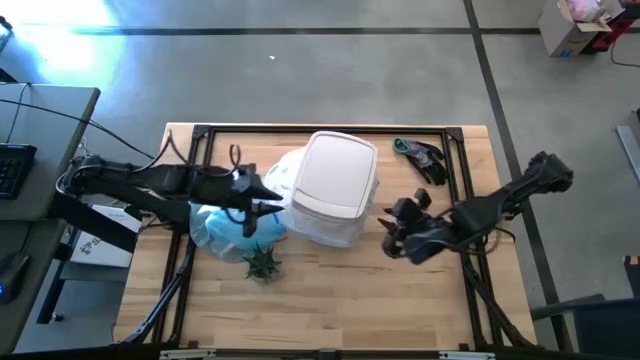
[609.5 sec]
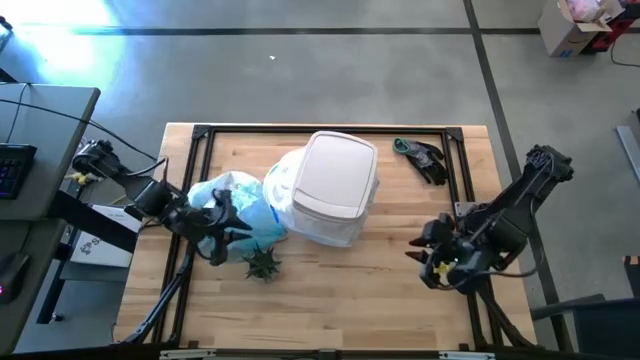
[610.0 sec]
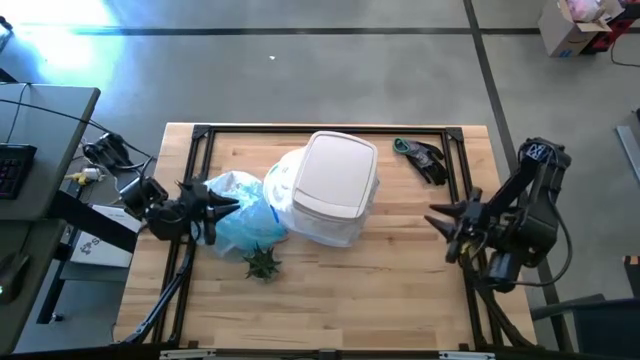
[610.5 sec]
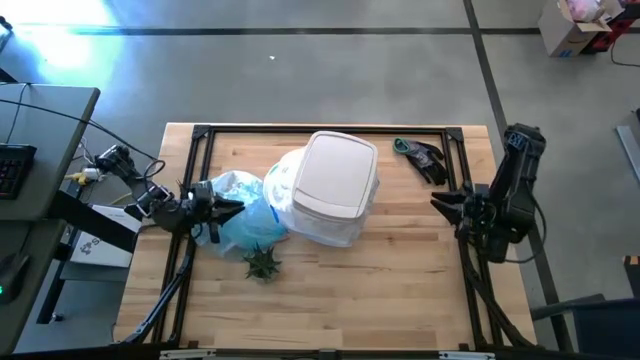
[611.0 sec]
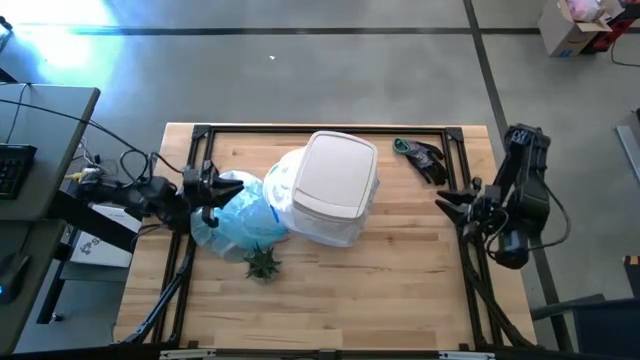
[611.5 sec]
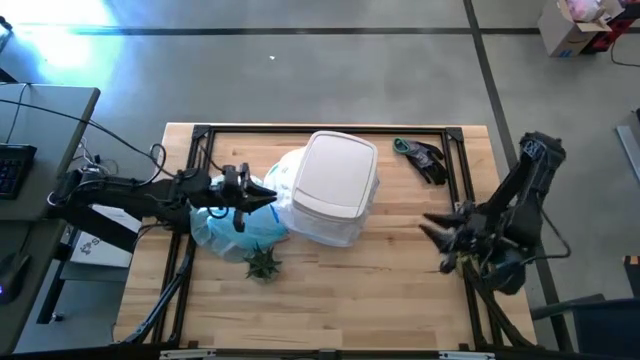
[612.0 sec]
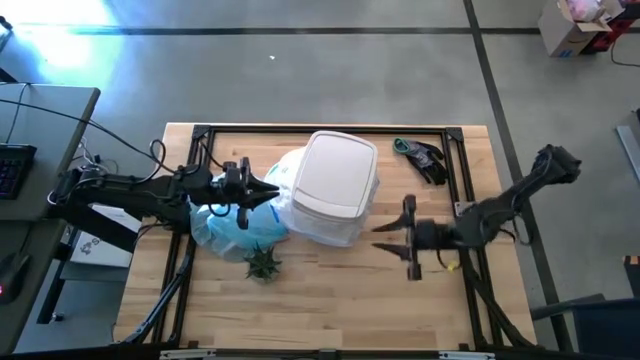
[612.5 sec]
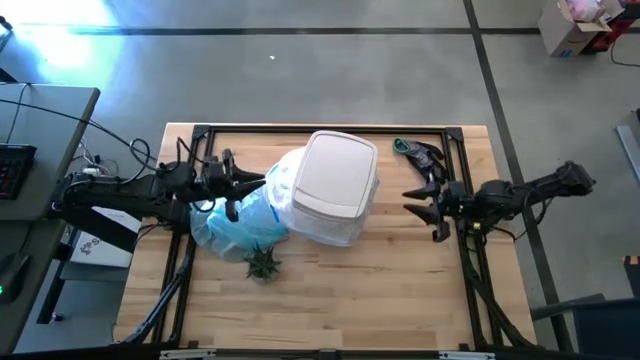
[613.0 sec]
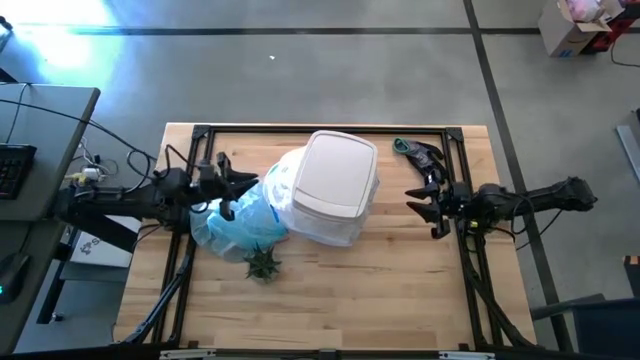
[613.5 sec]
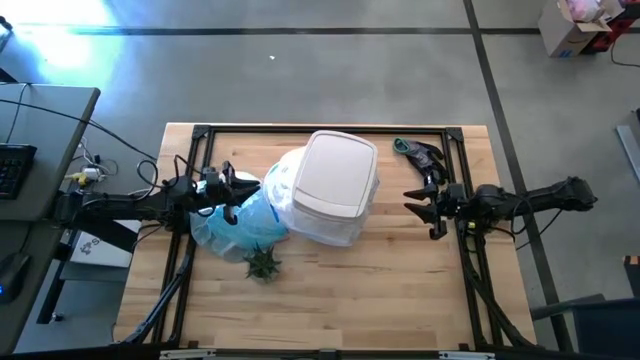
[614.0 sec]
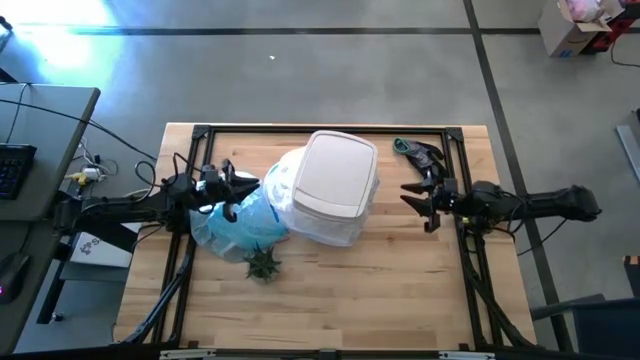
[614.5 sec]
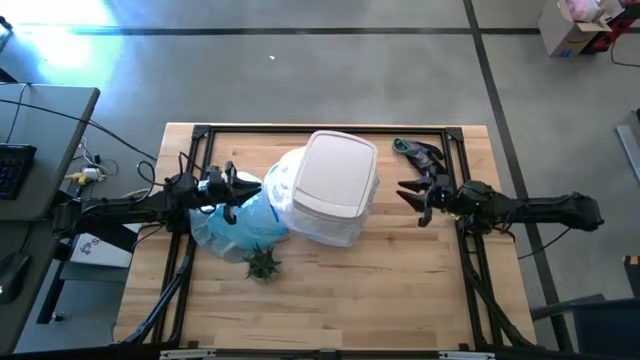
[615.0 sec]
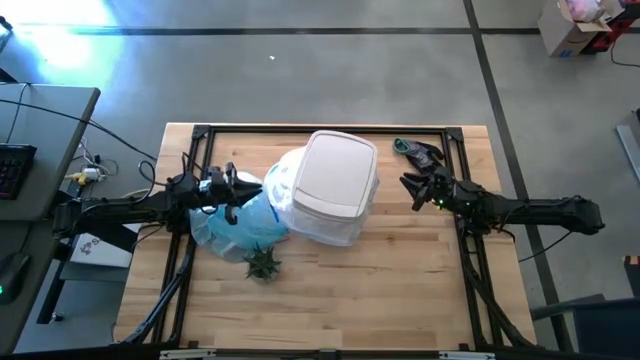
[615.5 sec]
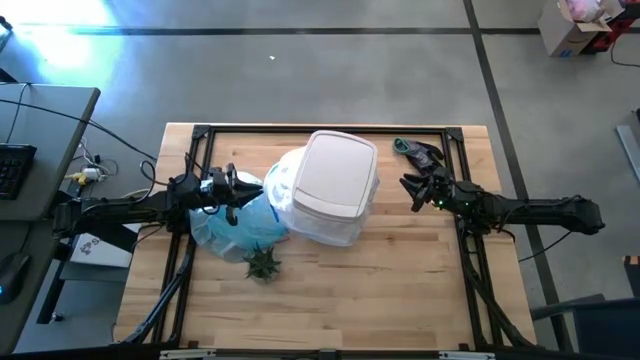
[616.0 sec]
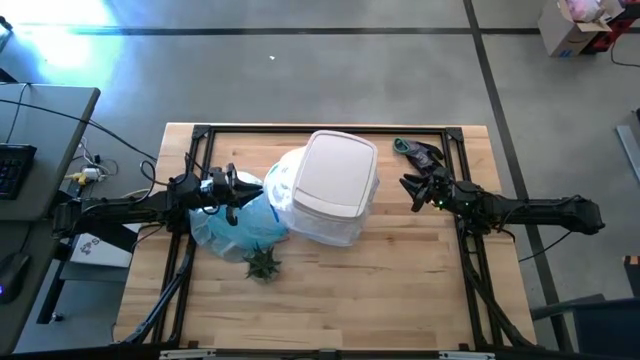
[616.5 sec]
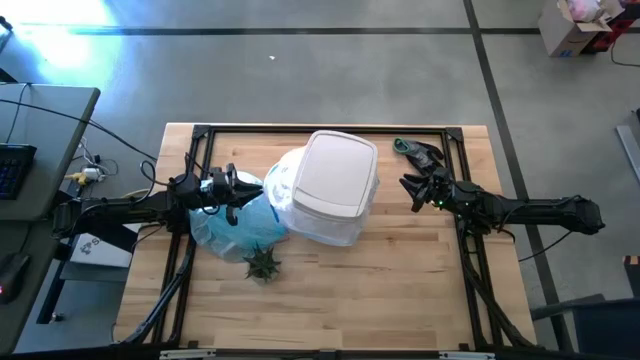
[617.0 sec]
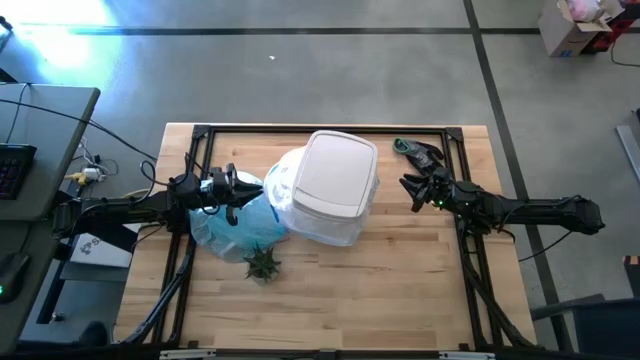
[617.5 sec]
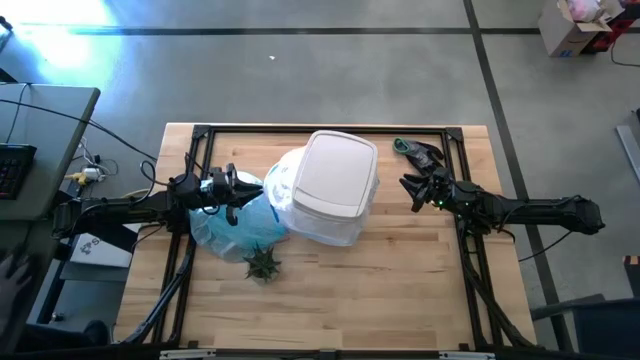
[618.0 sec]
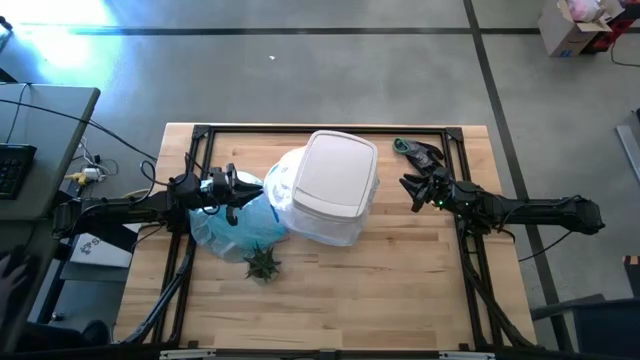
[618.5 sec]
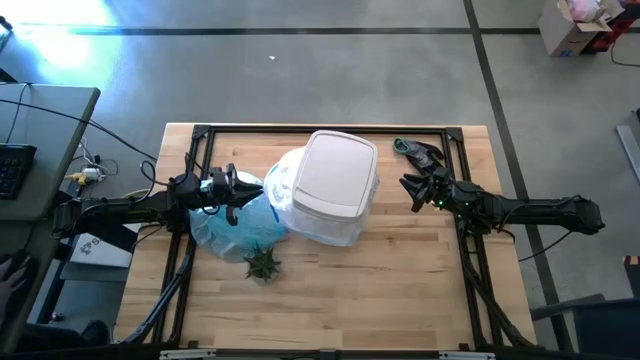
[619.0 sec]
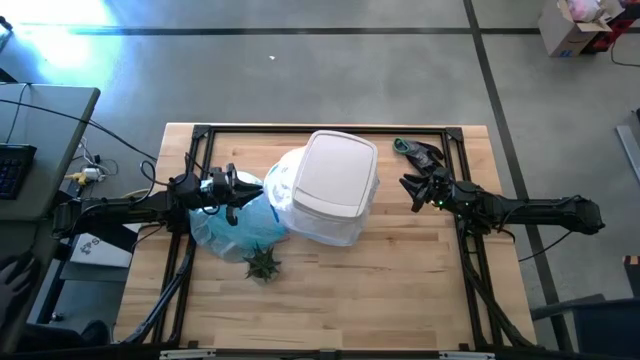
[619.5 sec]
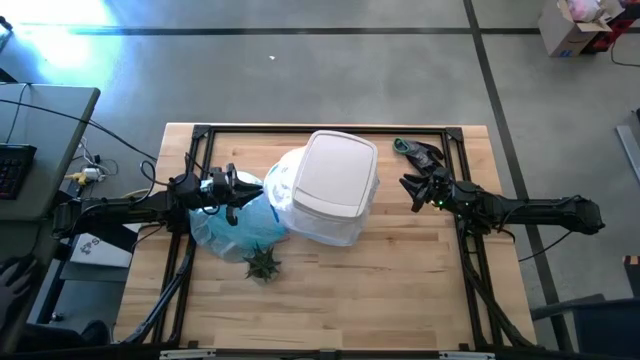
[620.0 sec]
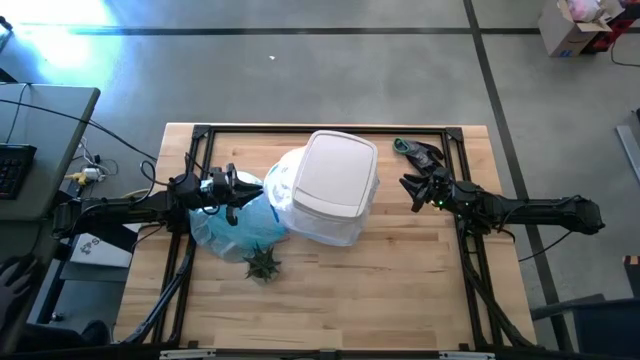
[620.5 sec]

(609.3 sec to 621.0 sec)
Task: place trash/remove bag and relplace
Return to Home Position

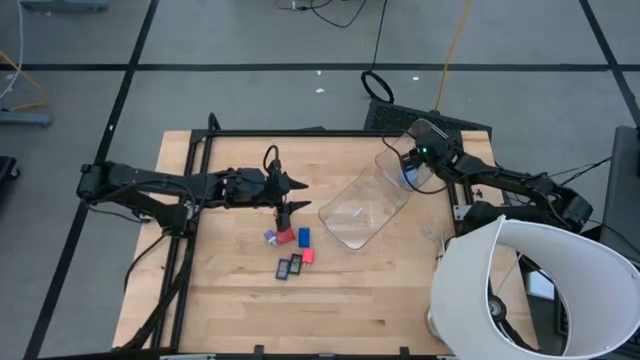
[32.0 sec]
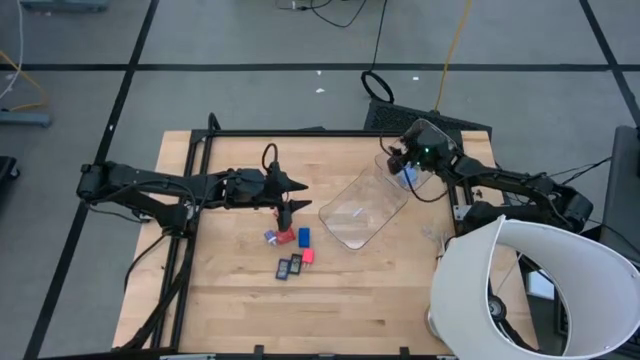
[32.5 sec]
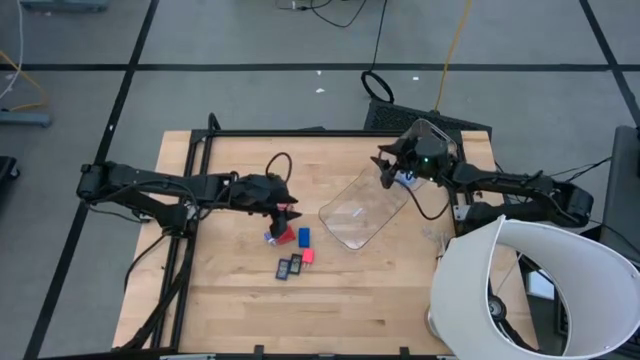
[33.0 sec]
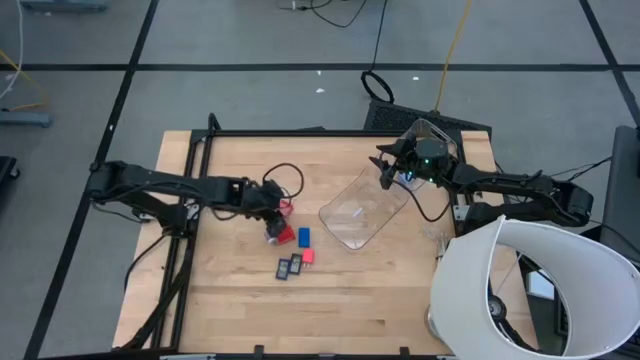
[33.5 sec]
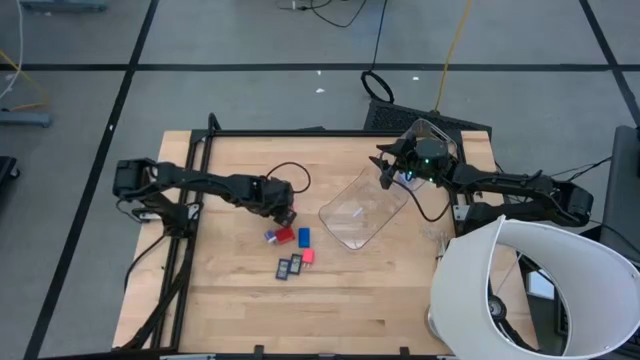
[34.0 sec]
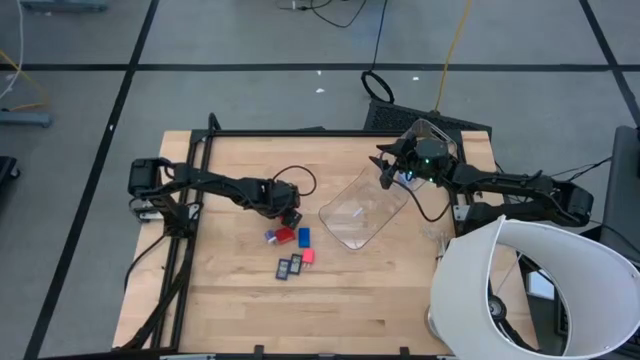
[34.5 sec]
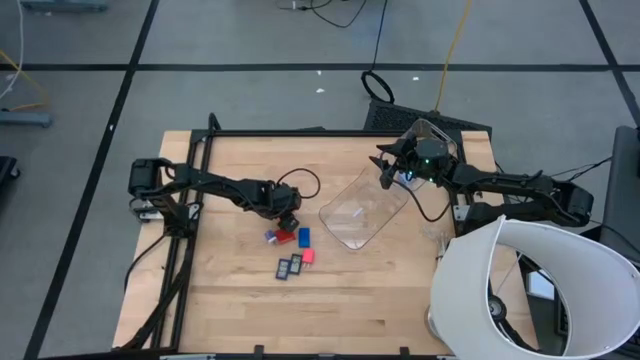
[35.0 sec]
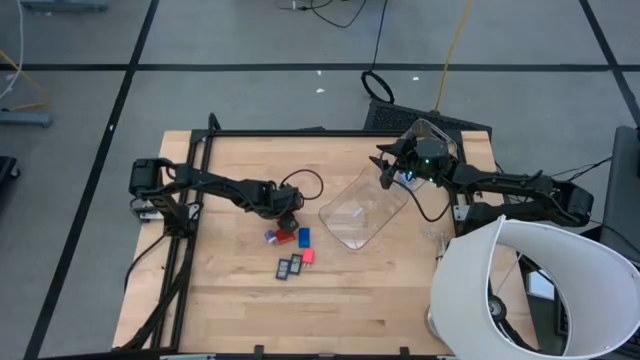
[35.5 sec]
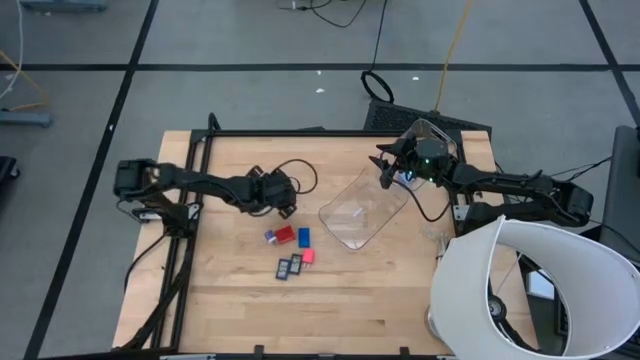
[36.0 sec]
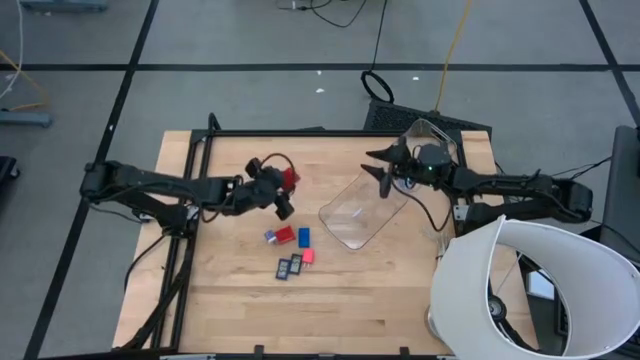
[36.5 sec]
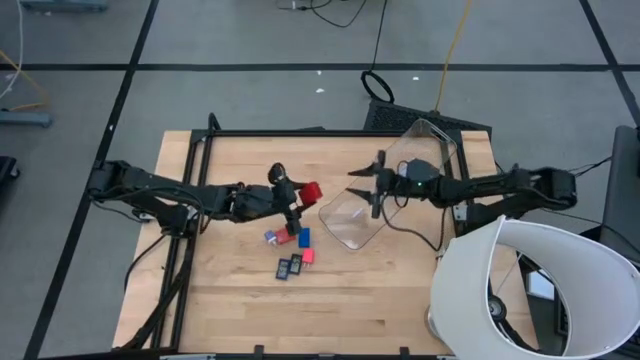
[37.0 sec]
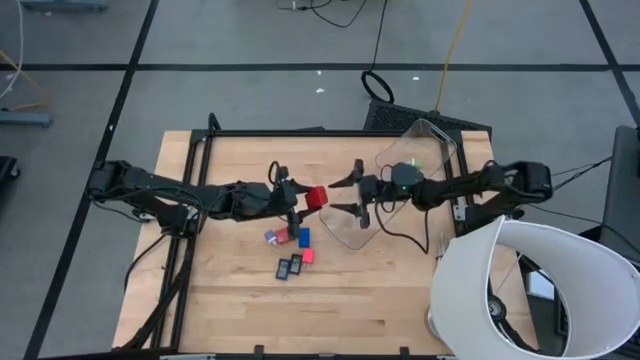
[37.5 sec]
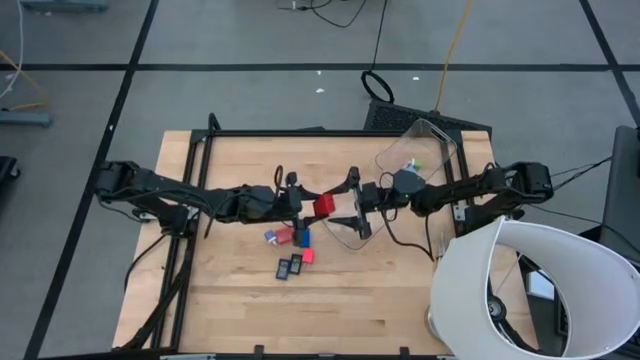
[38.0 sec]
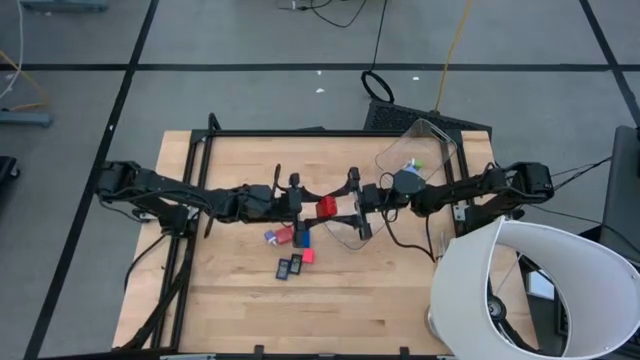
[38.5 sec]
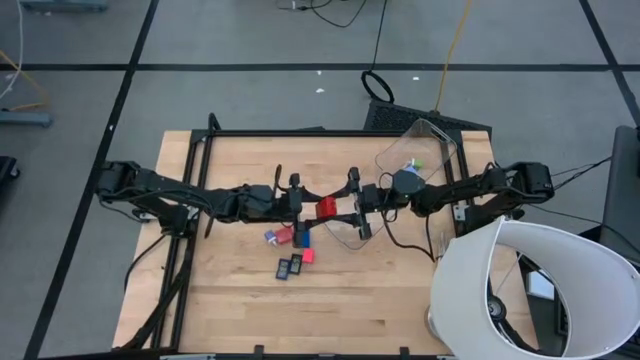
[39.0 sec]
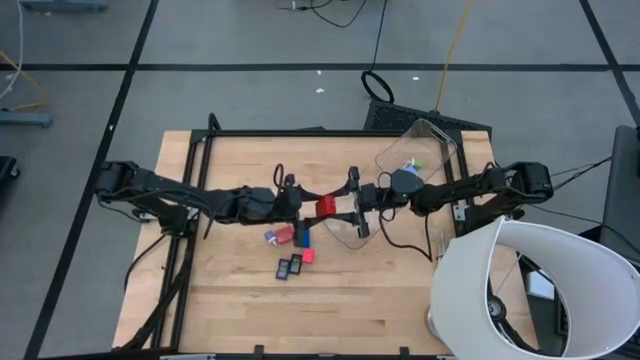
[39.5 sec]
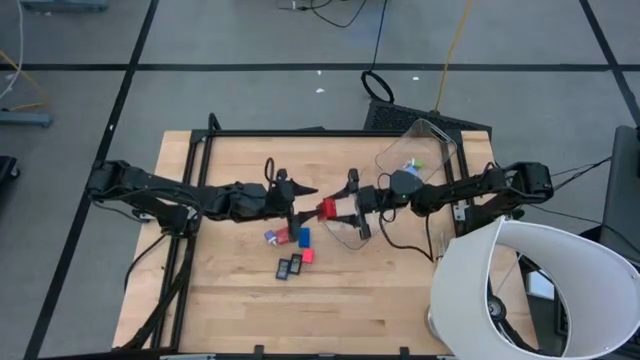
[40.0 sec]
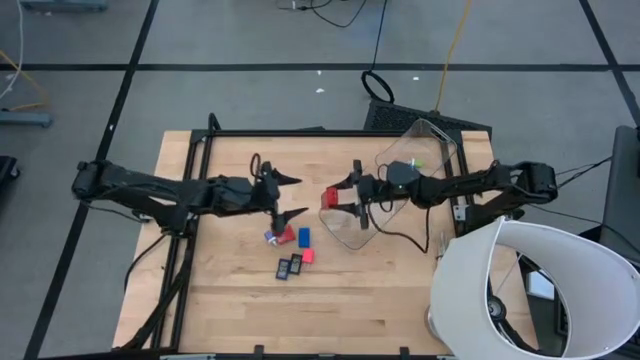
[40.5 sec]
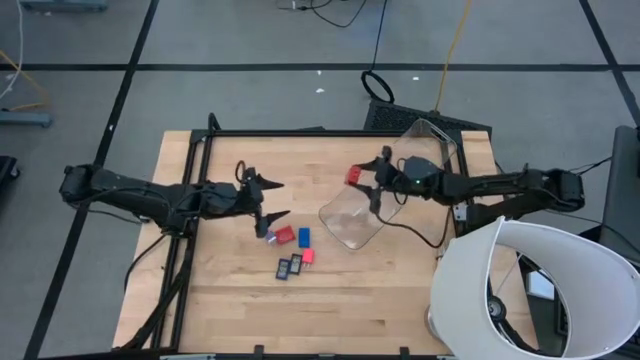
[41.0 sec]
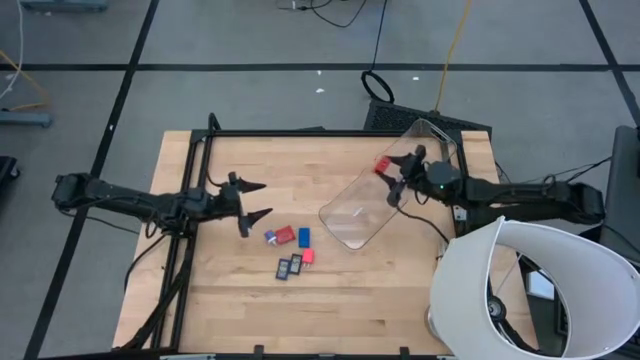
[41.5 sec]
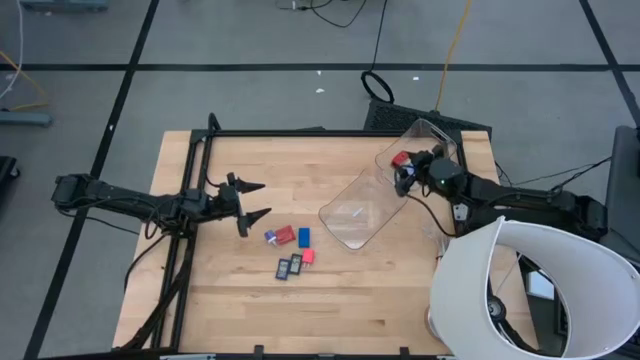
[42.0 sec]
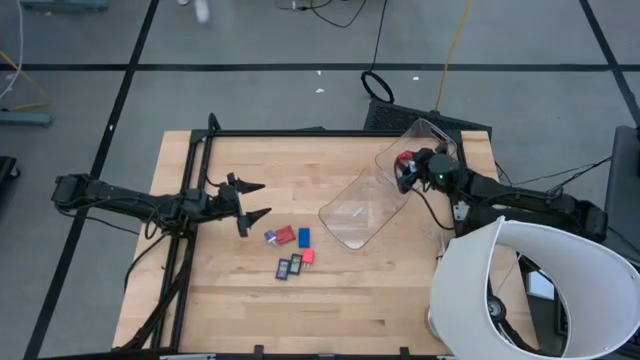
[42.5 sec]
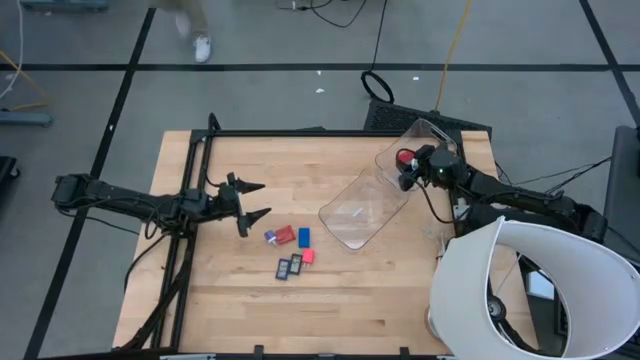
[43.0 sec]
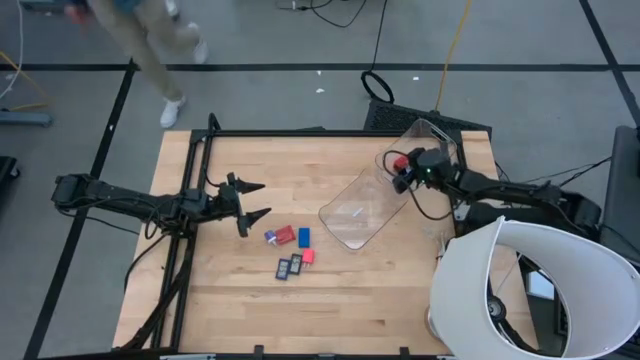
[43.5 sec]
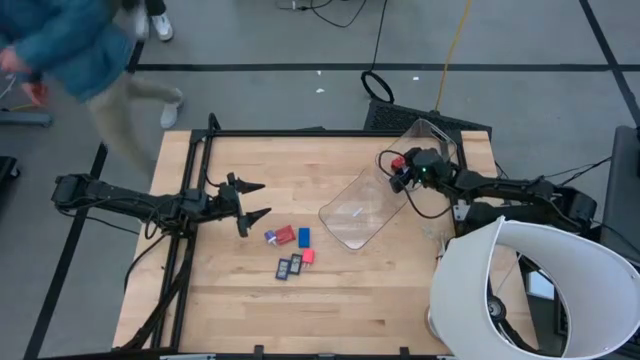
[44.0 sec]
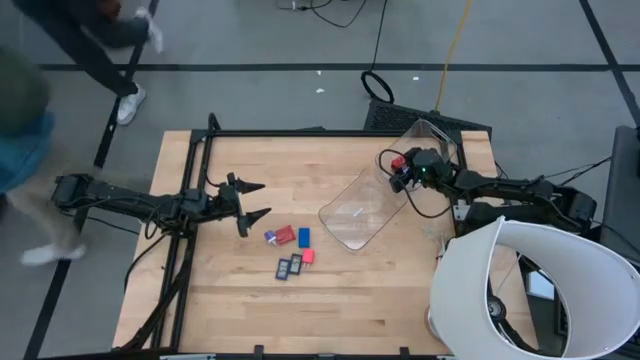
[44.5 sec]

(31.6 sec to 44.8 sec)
Task: Pick & Place Office items
Put the top red charger adapter into the right transparent bin
